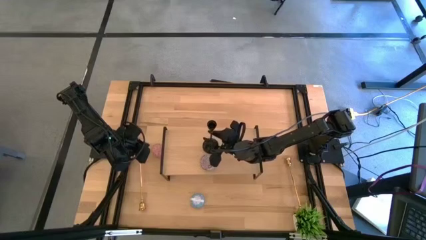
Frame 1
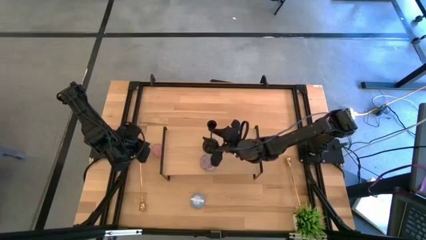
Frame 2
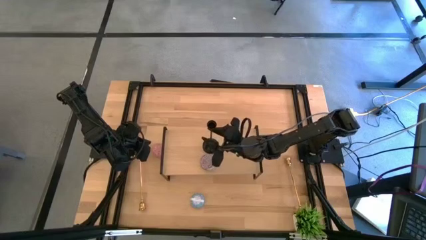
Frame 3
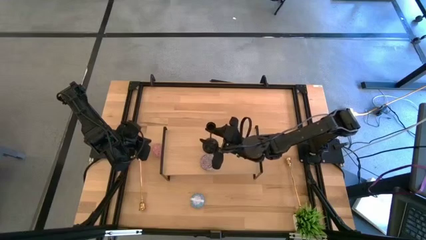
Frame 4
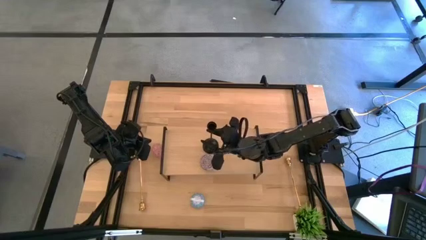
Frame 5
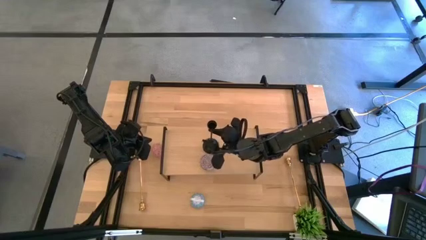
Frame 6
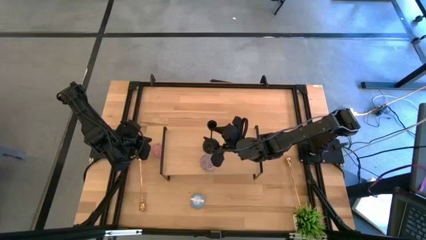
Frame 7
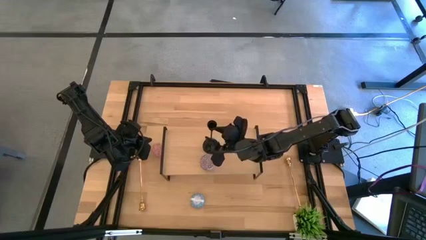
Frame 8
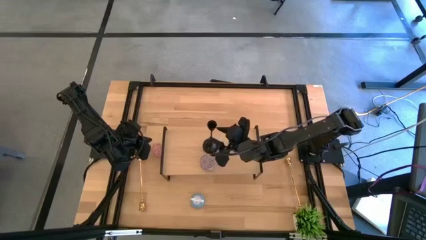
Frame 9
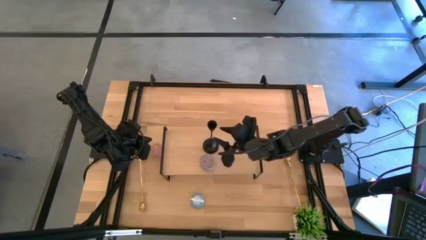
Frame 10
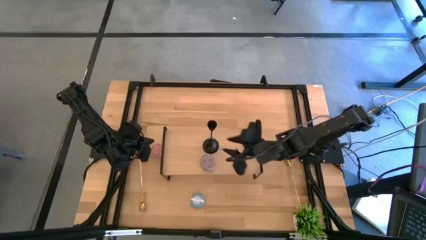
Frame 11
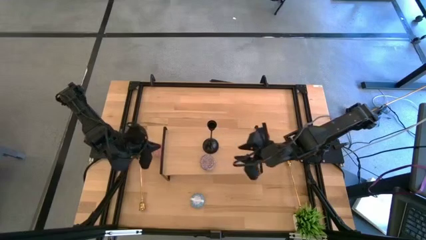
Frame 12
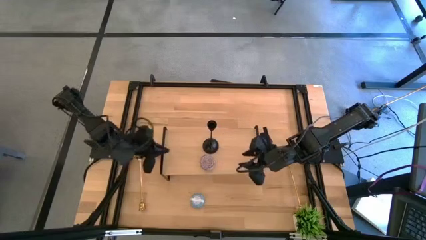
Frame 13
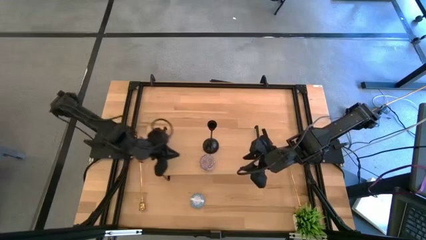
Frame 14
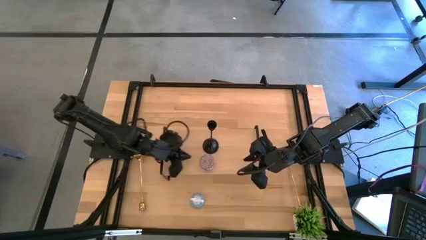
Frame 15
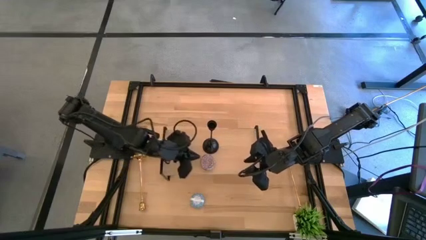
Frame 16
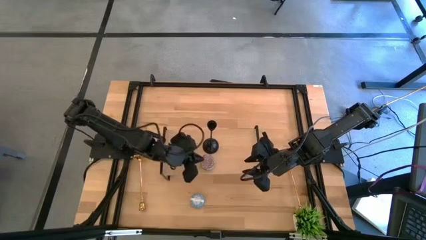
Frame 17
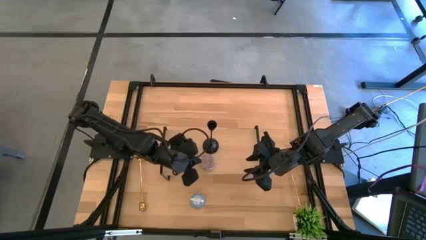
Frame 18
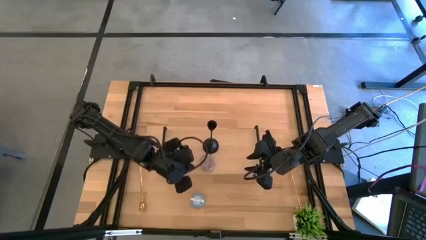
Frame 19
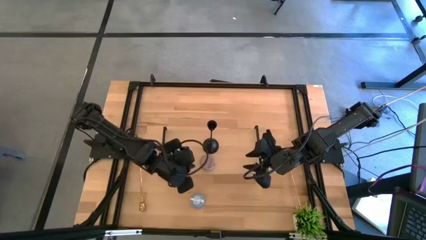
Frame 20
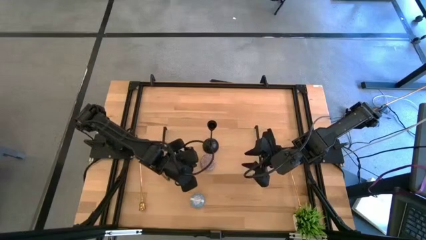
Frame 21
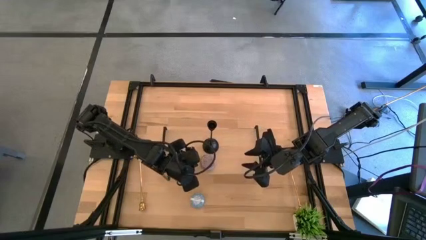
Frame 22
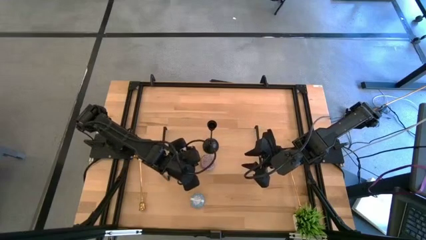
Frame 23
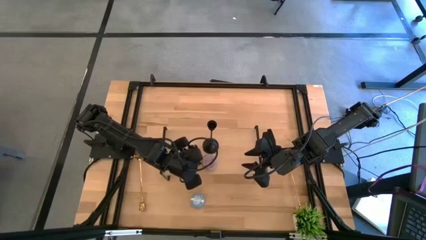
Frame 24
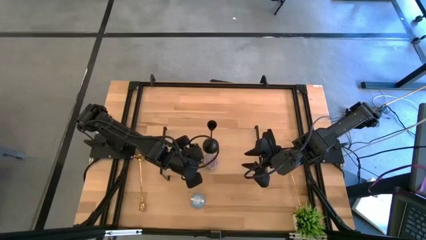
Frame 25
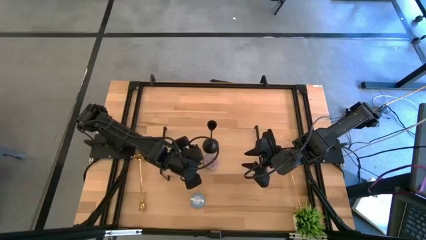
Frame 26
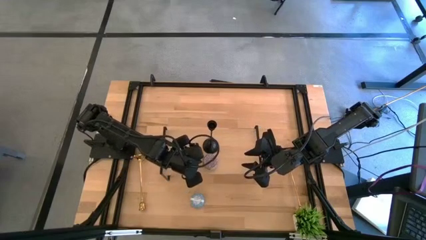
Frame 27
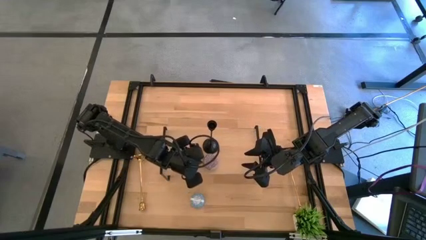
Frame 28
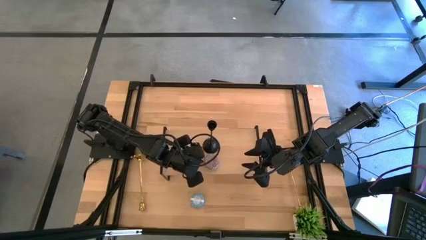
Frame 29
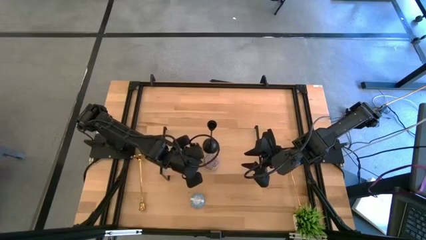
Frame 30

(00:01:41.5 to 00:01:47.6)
Task: Pick & Place candle stick holders
Adjust the red scented candle on the shelf

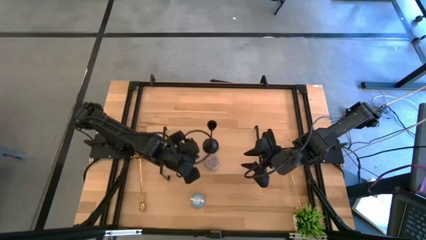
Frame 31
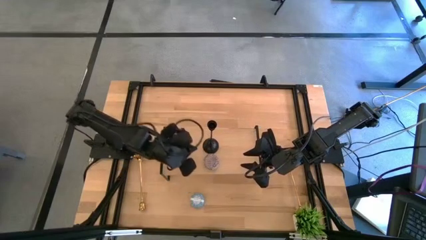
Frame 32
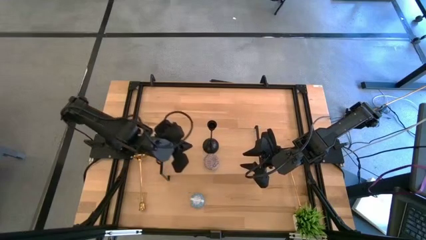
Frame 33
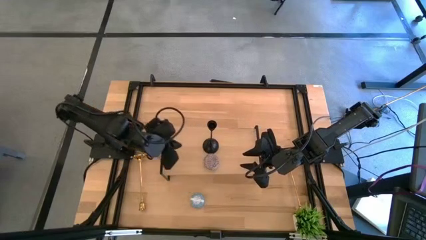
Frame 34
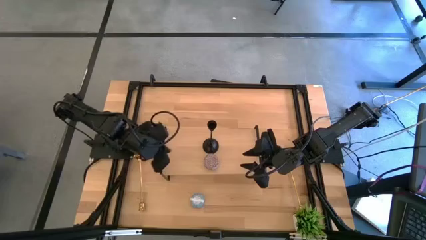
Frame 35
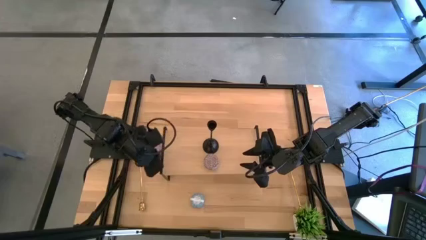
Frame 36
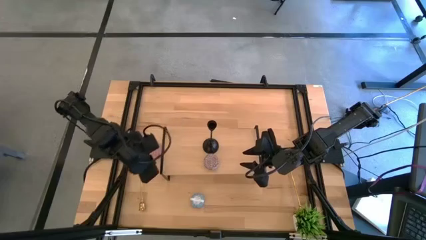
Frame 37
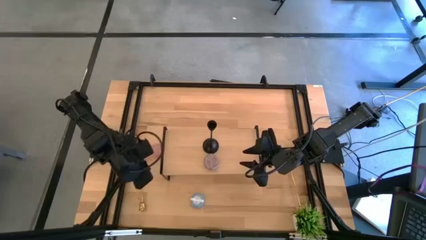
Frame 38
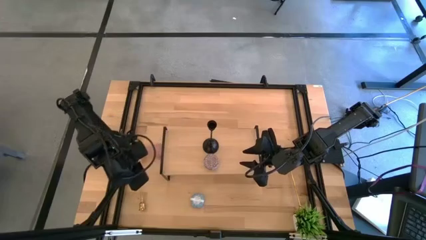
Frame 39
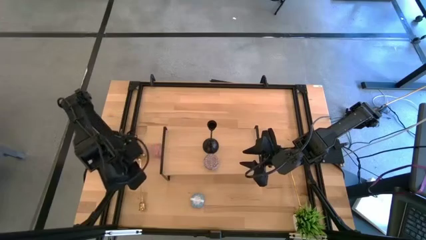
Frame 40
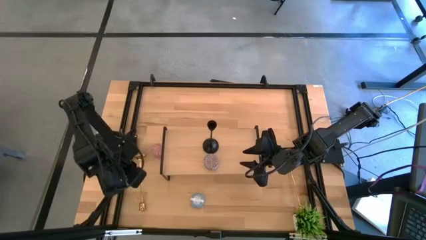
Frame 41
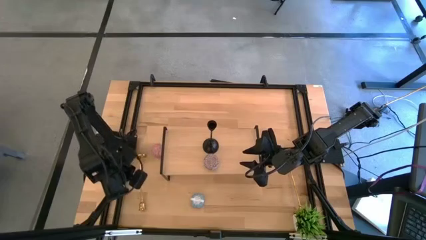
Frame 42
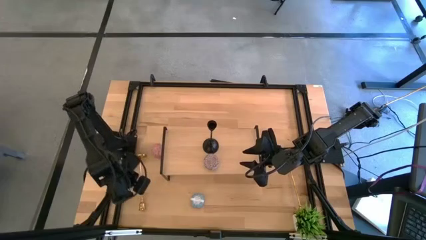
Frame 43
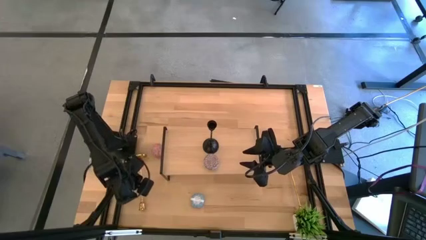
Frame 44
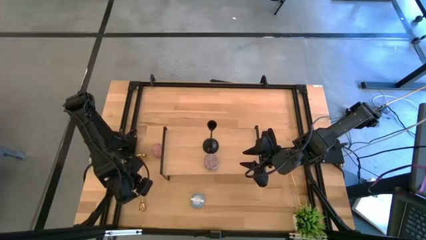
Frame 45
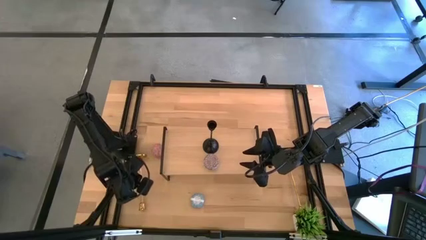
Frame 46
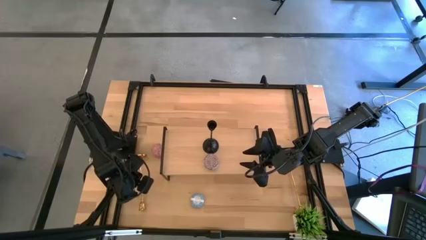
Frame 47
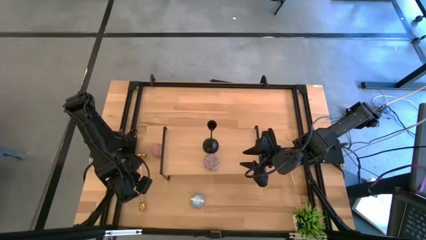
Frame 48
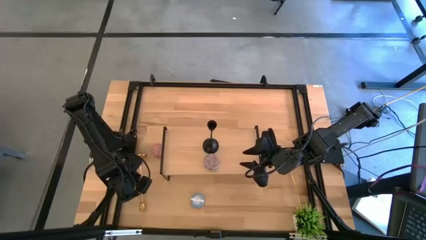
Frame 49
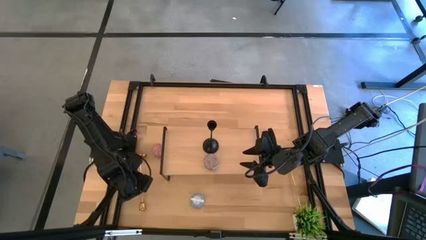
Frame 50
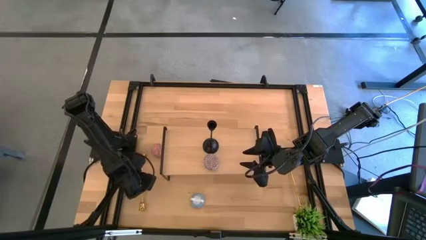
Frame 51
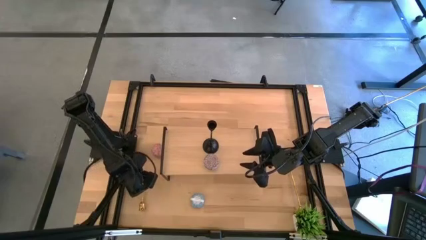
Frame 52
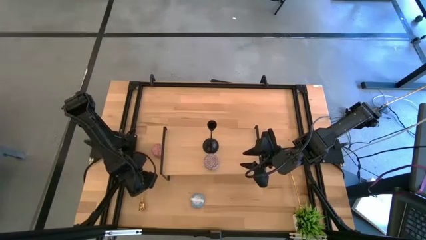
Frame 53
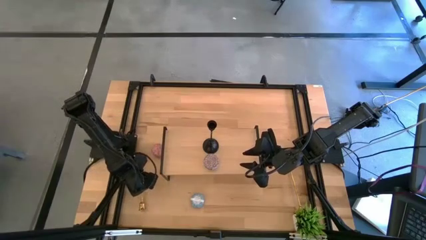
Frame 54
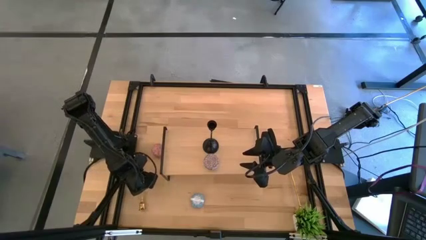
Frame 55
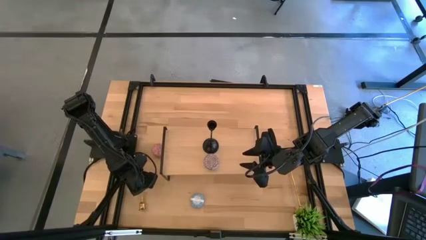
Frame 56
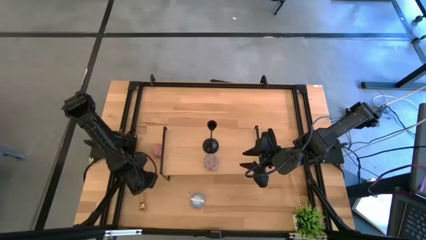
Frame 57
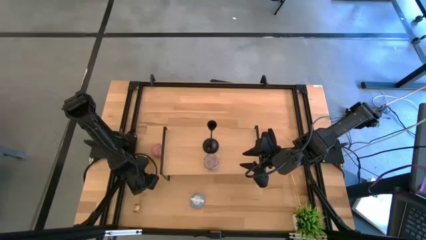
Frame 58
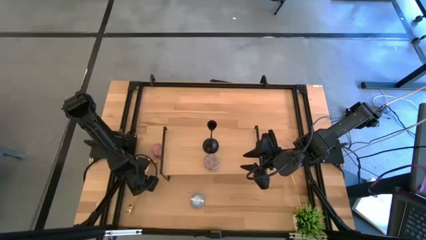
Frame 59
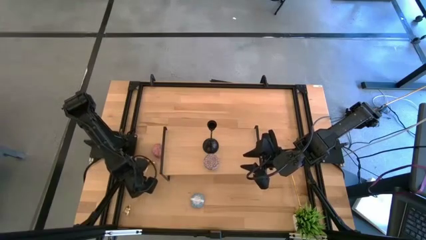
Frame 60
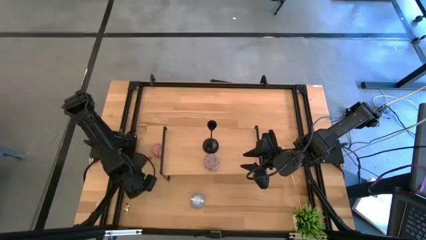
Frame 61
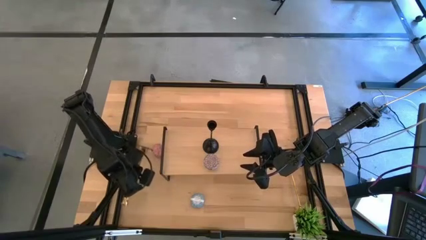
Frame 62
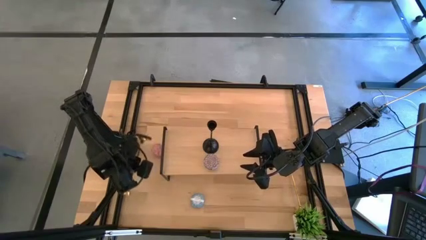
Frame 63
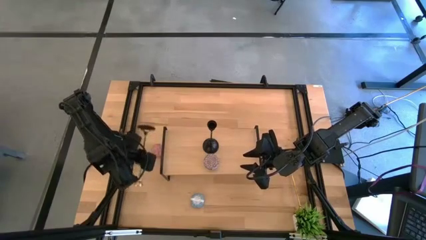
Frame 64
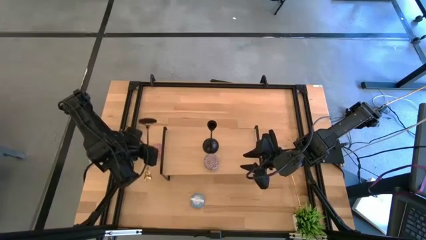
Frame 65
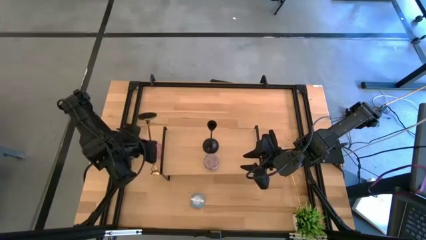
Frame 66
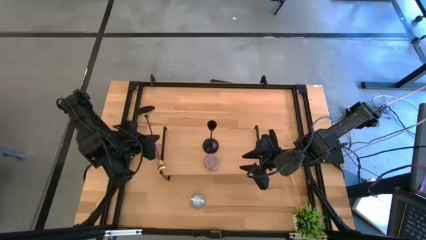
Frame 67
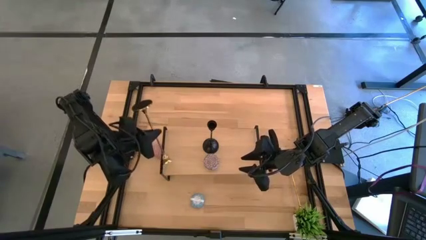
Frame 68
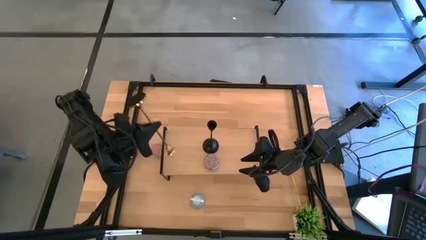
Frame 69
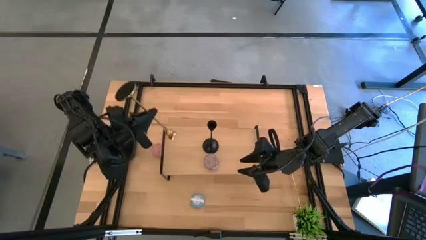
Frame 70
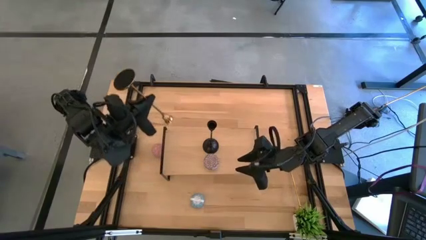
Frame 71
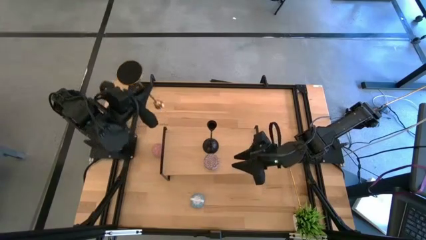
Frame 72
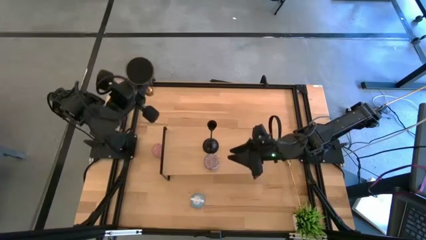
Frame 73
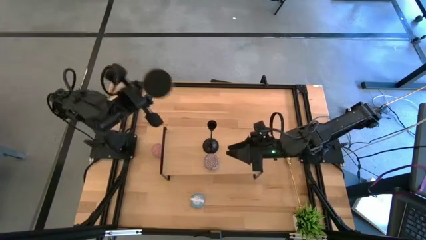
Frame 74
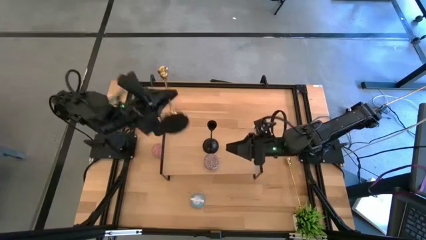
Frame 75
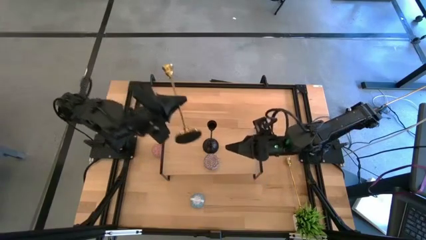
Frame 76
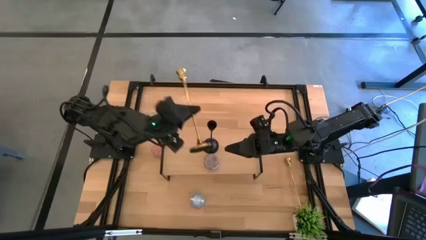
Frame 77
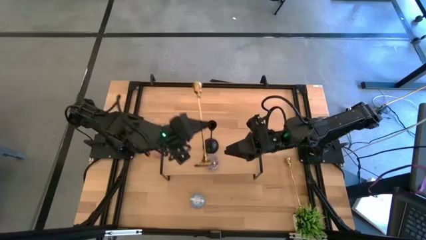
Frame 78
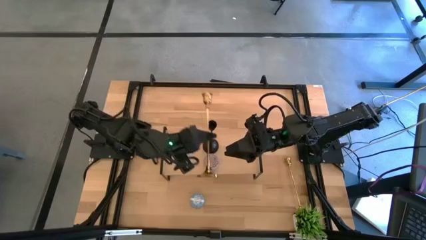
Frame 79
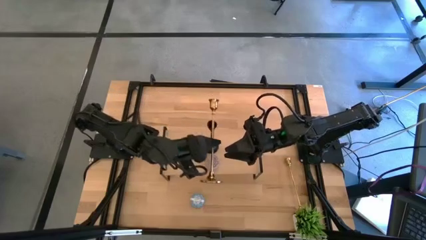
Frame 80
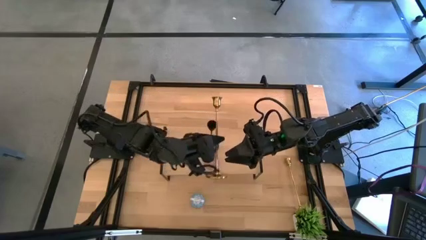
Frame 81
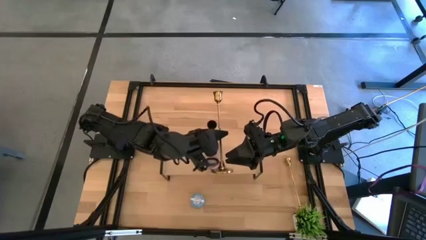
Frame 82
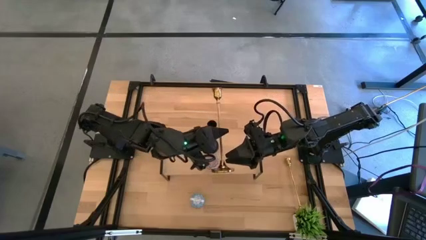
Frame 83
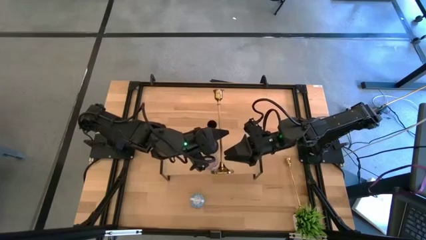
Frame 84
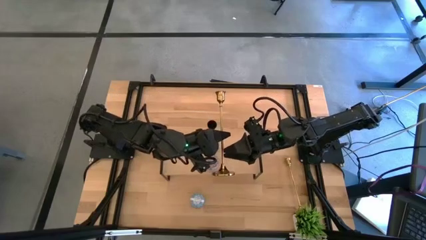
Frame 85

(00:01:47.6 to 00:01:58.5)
Put the gold candle holder on the shelf
